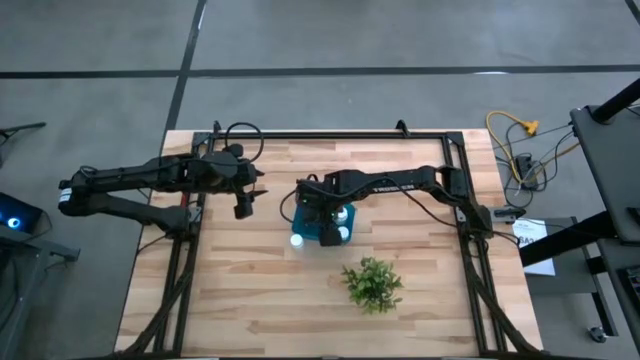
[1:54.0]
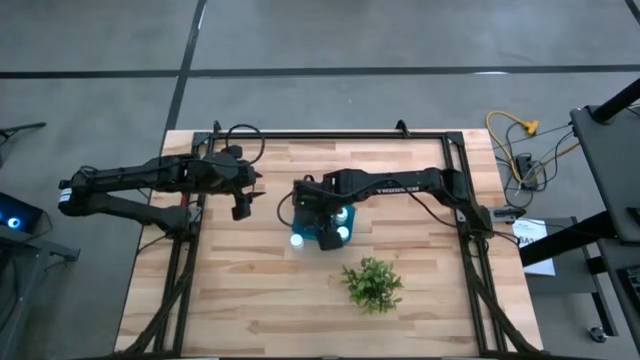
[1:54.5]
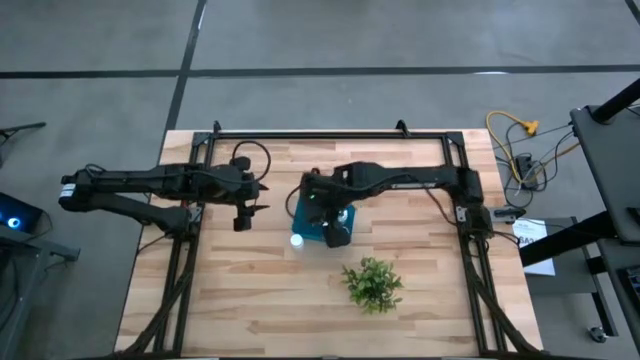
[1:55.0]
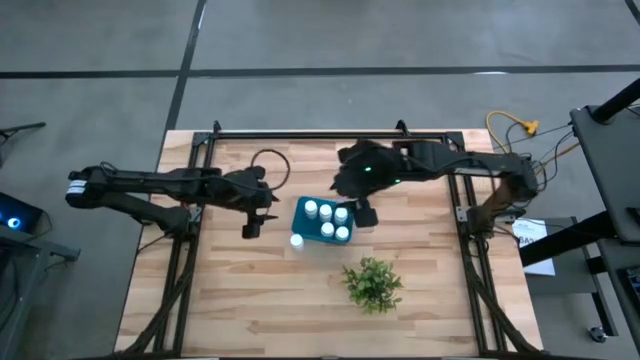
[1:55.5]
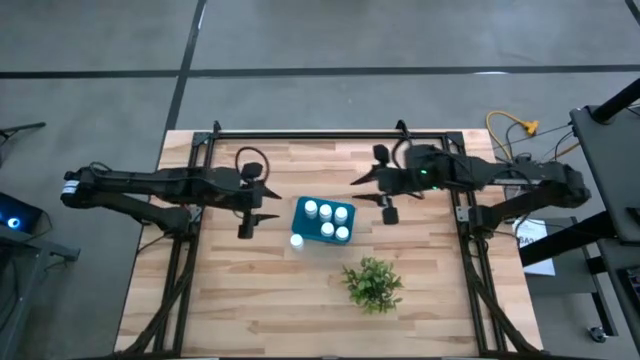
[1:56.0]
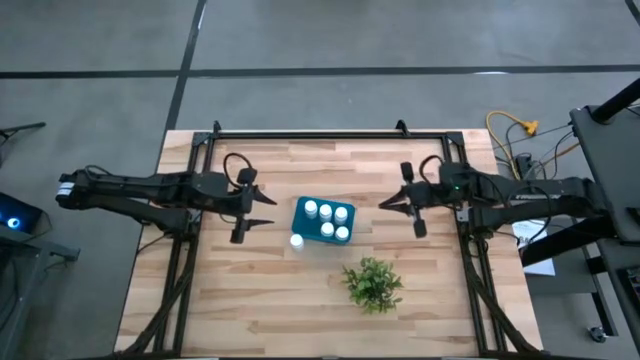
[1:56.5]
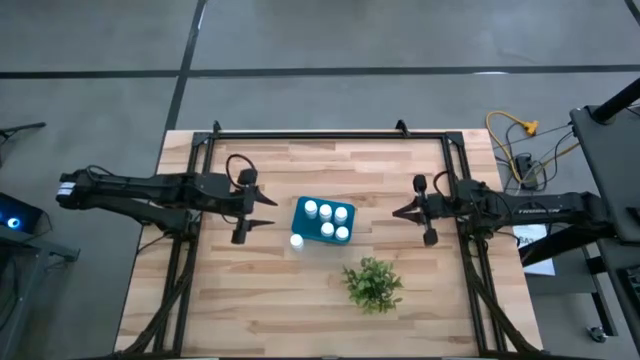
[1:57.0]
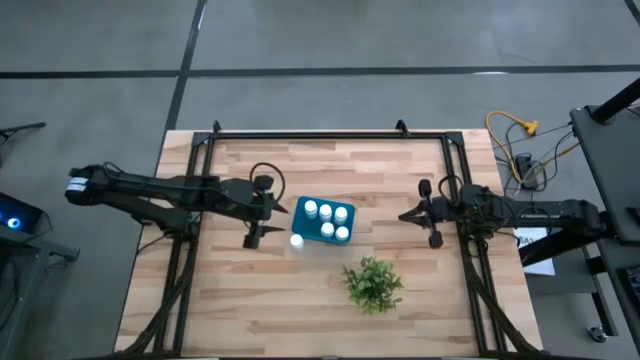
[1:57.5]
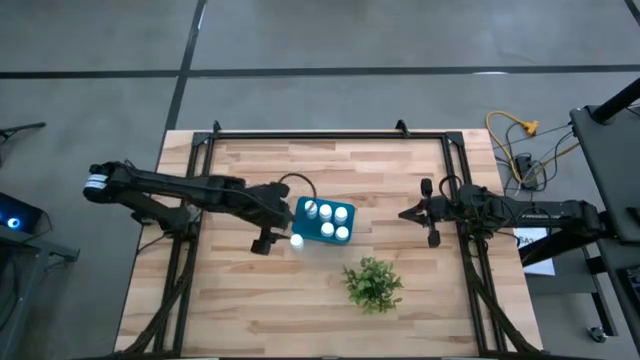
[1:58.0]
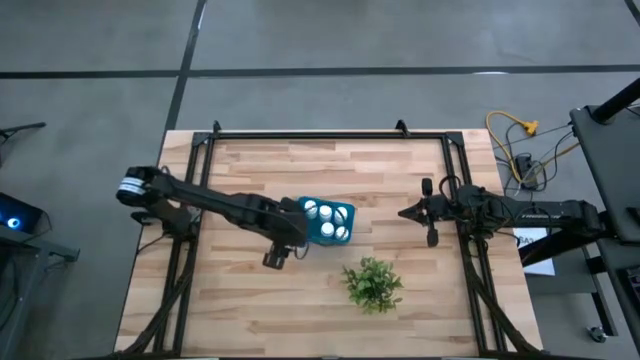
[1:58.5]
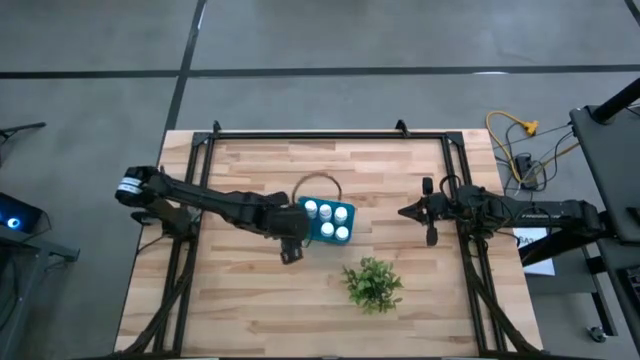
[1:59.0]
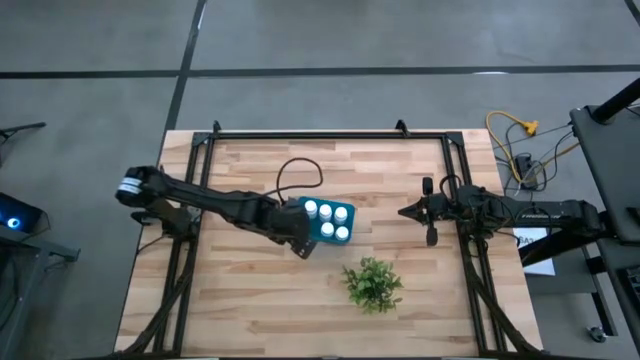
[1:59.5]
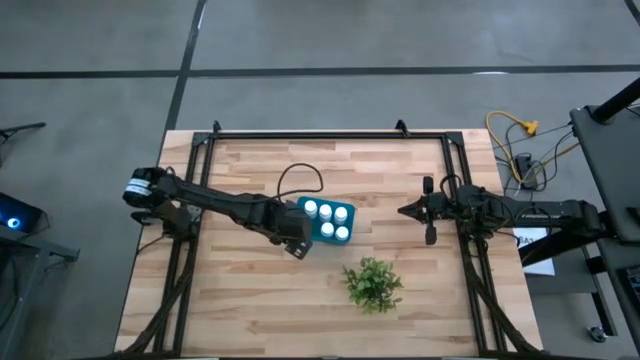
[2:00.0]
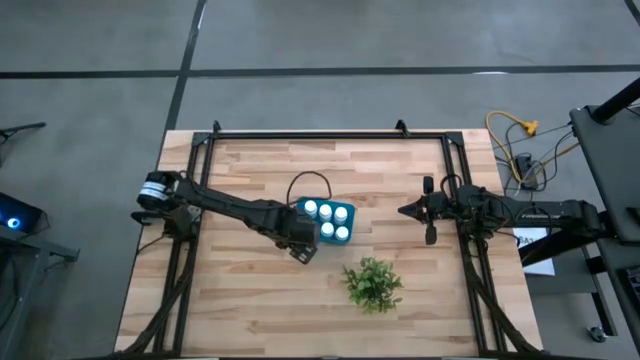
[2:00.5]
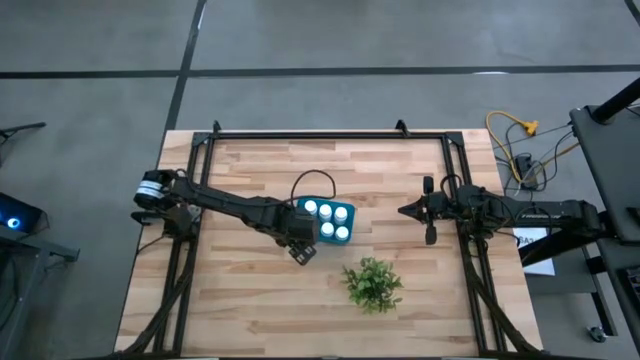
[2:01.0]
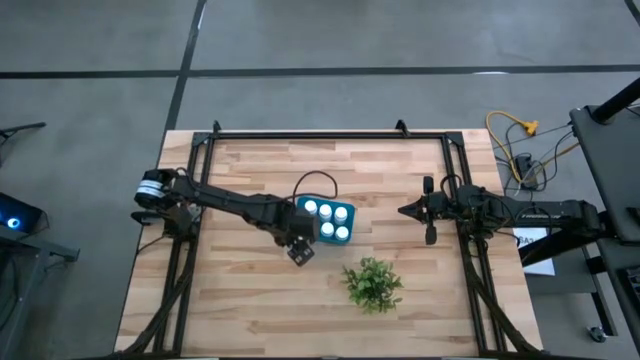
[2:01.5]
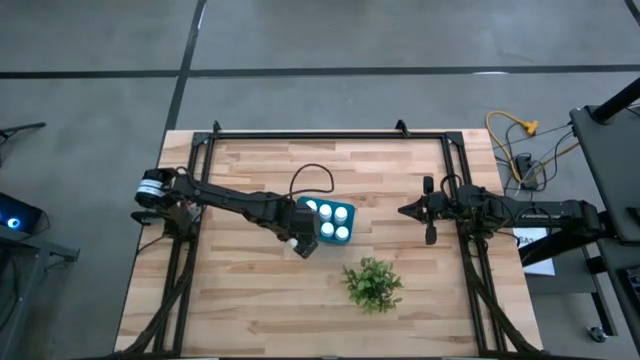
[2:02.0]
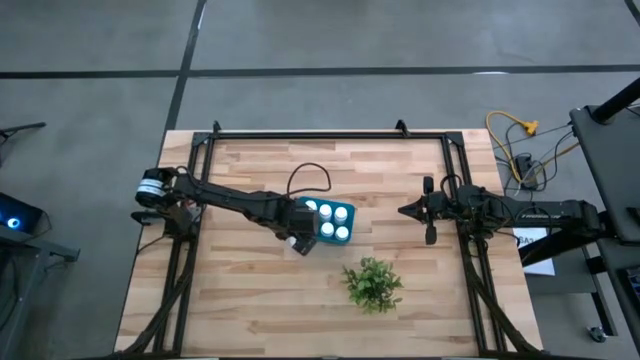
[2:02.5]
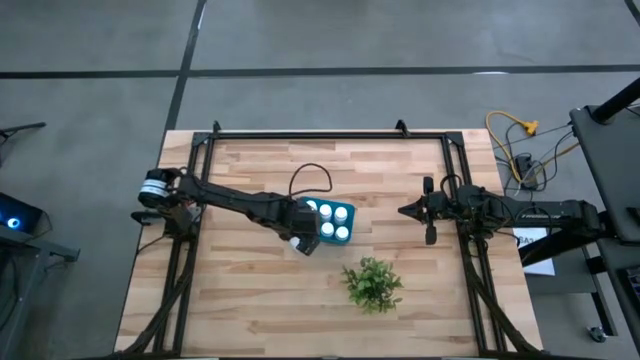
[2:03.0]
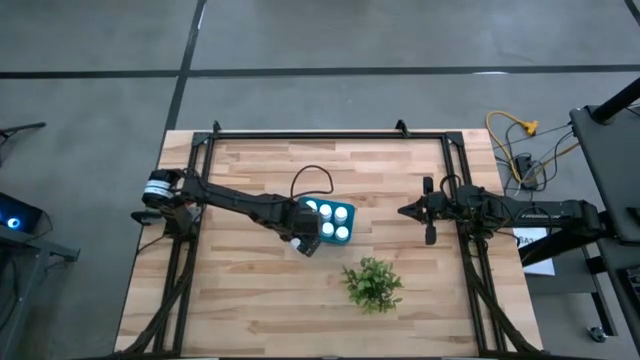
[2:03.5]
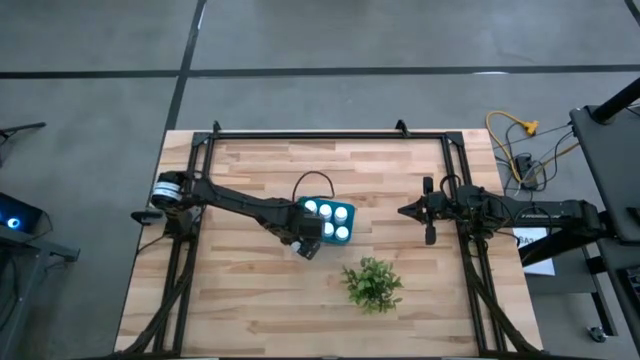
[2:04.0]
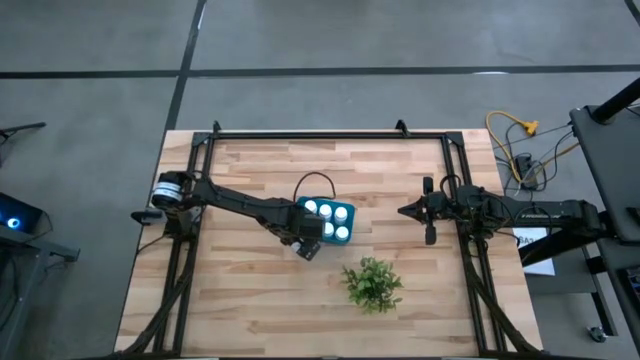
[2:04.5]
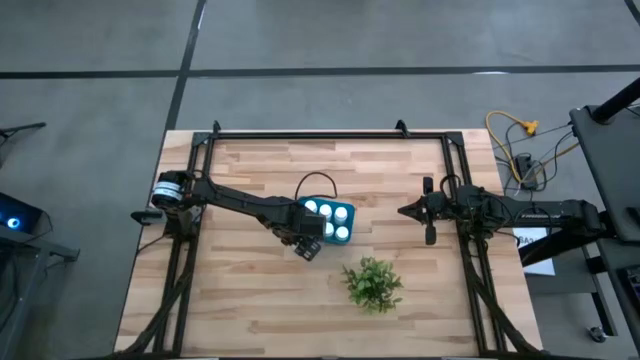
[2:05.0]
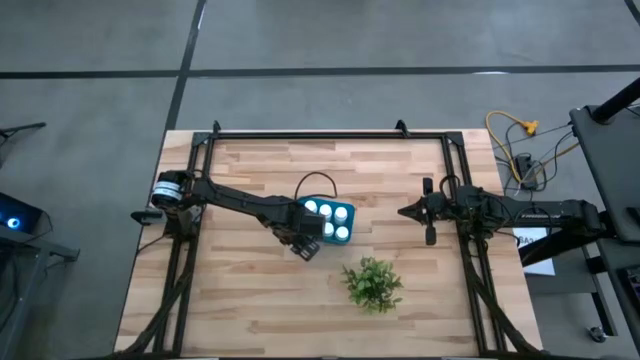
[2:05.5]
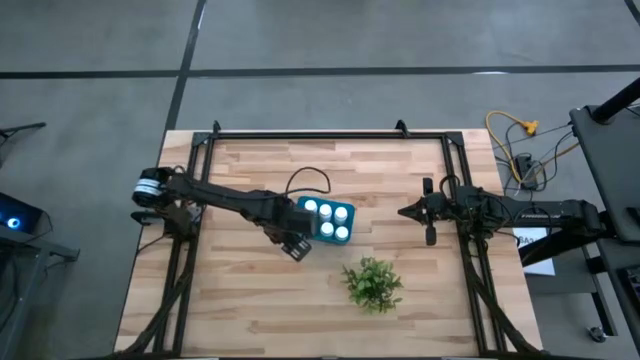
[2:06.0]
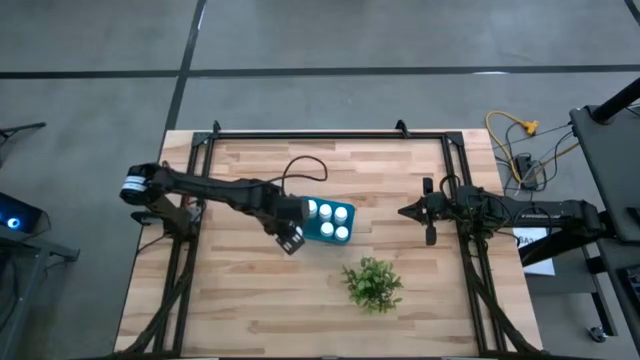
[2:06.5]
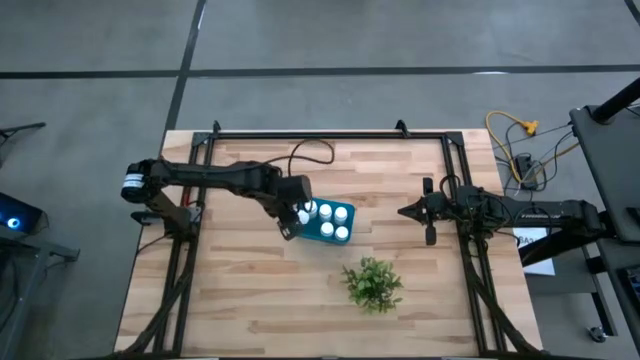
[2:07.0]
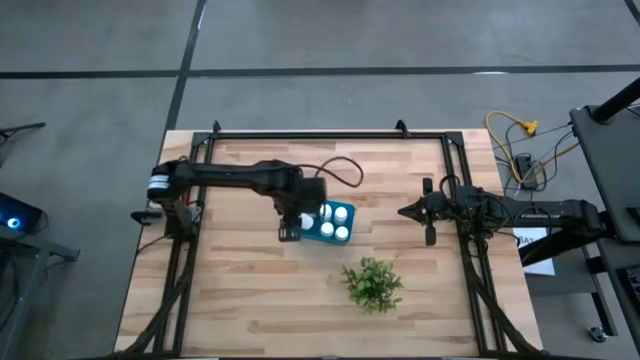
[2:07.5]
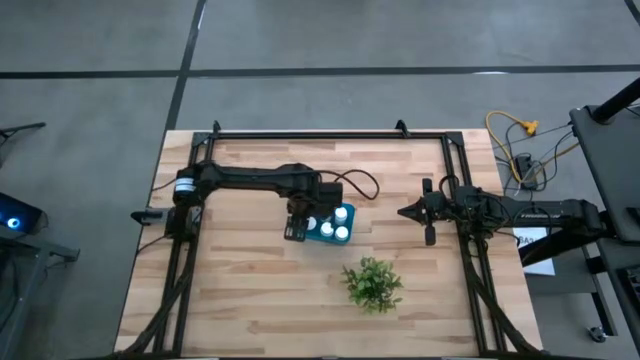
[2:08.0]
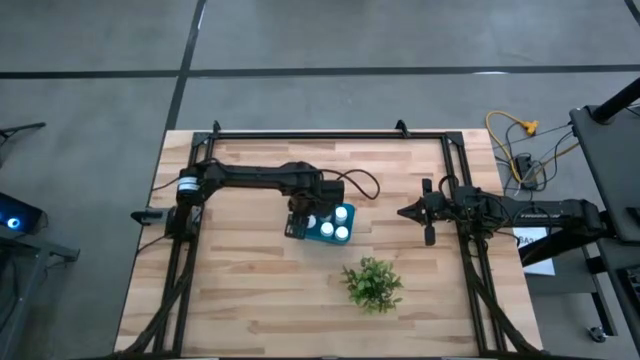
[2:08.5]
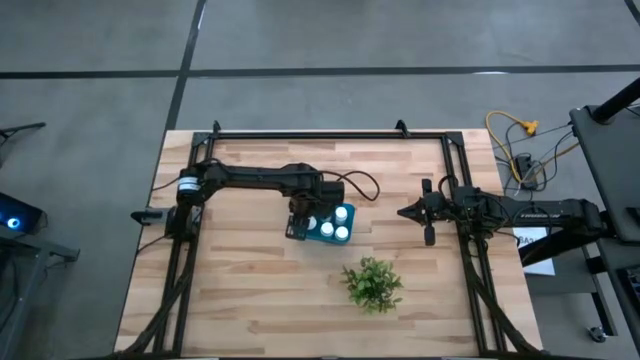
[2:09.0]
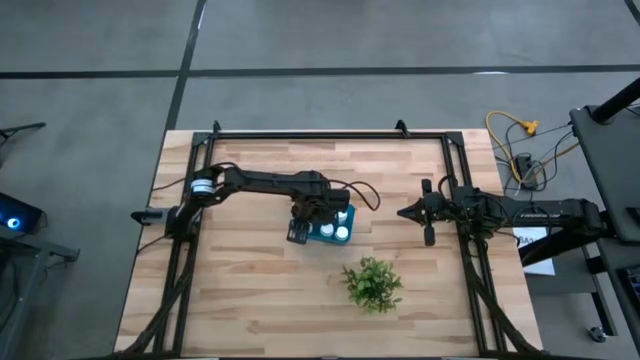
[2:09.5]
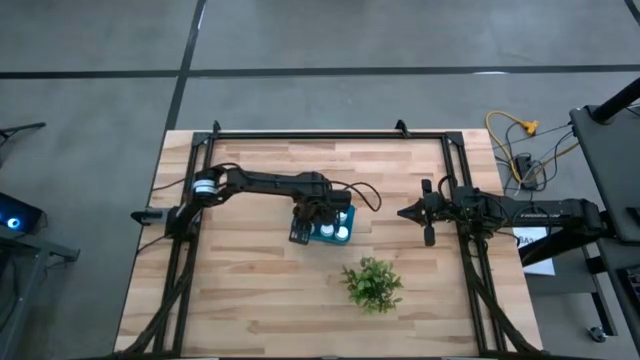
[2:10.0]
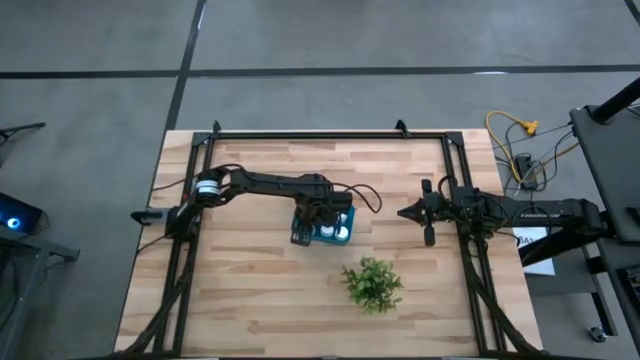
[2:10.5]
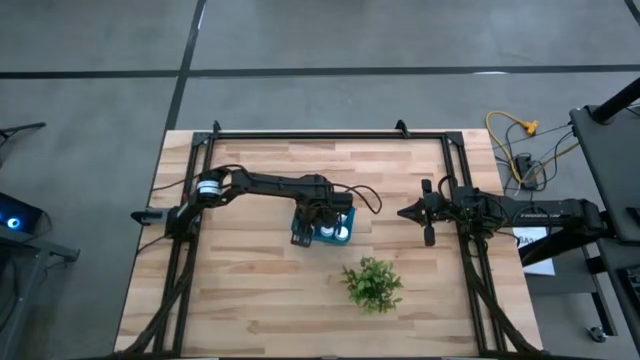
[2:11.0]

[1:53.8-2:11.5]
Task: Pick and place pill bottles into a basket
Put the white pill bottle in the blue bin

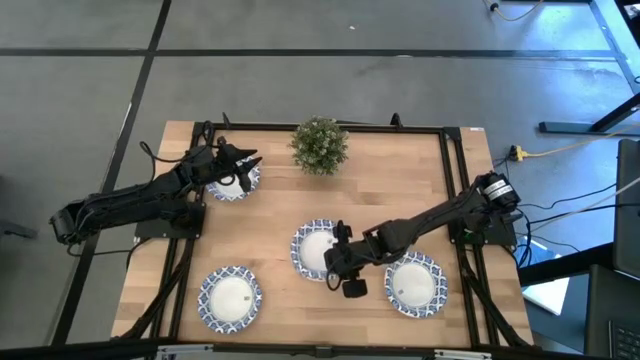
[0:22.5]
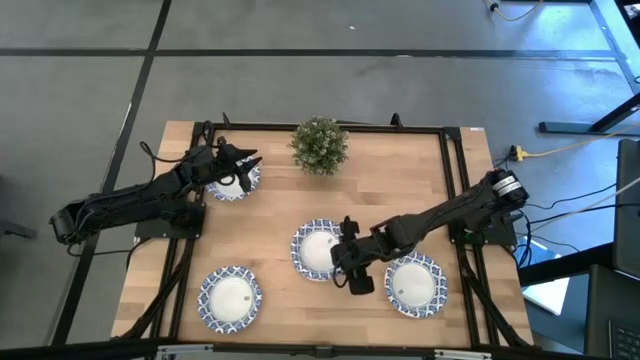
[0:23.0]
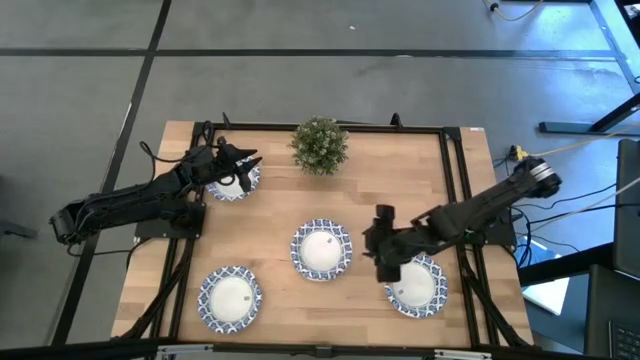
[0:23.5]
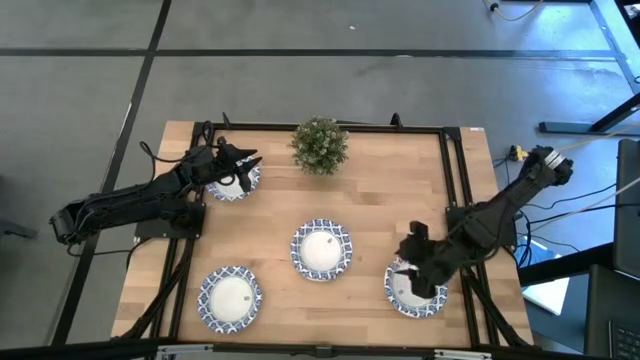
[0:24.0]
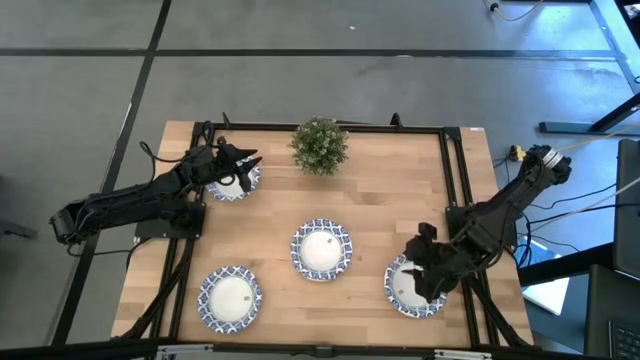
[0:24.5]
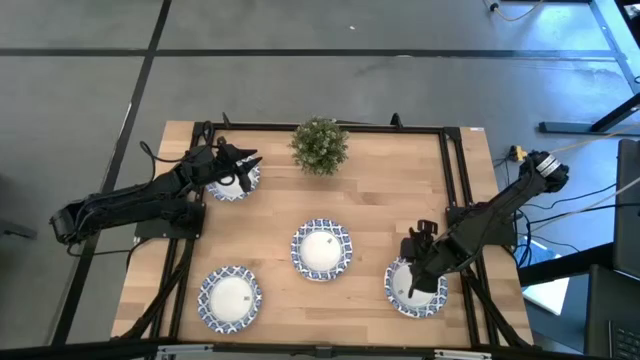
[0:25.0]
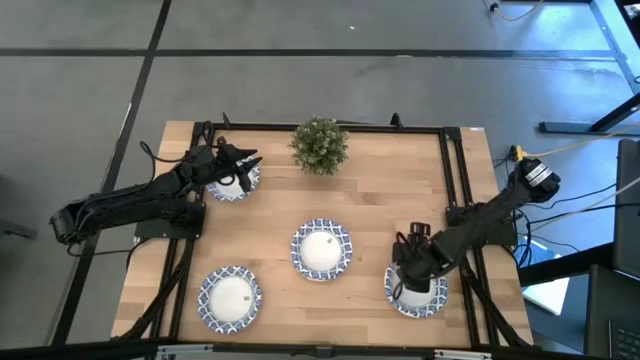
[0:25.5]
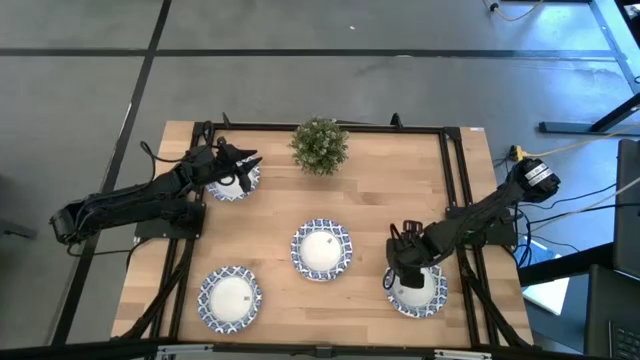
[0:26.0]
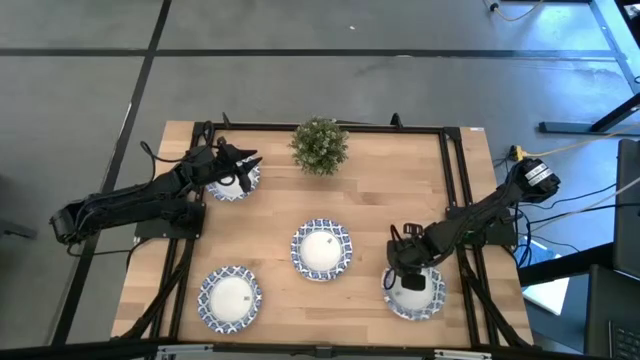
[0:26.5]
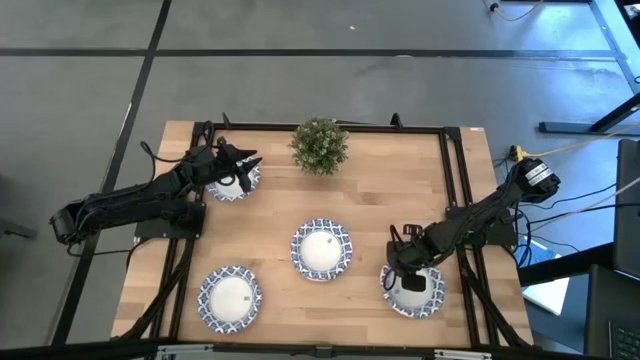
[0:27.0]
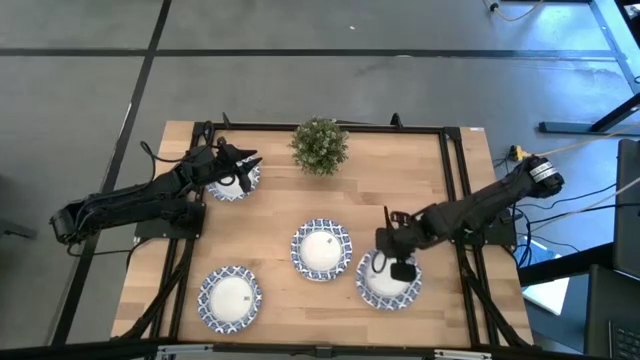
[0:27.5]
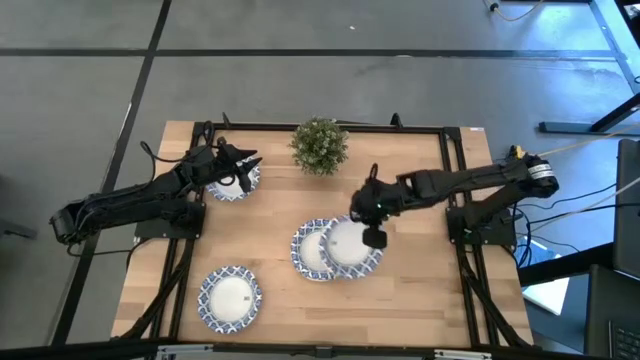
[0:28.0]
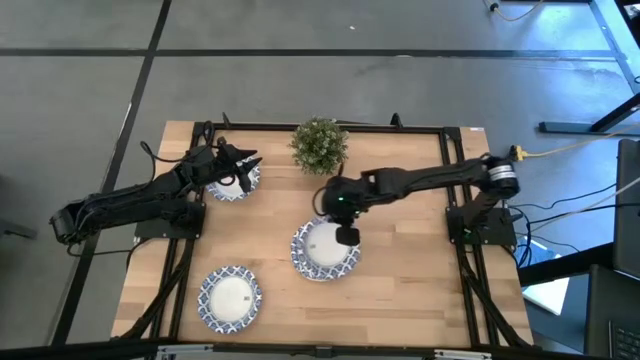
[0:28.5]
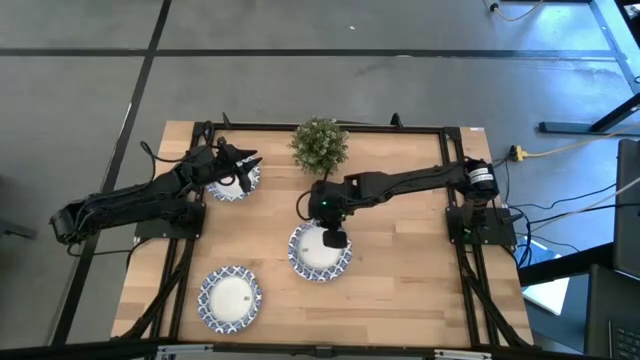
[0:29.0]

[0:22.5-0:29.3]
Task: Nest bowls inside each other
Stack the blue pattern bowl on the blue pattern bowl
